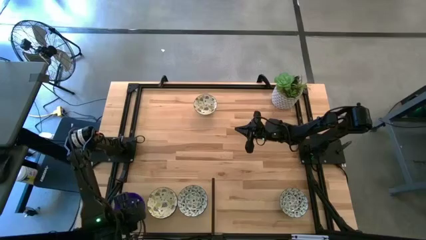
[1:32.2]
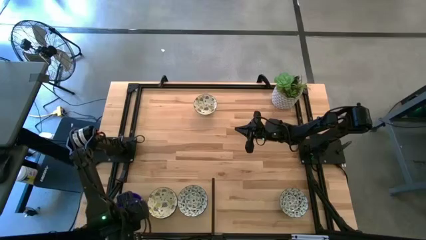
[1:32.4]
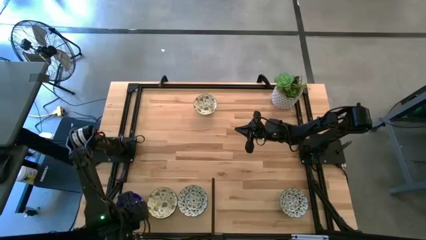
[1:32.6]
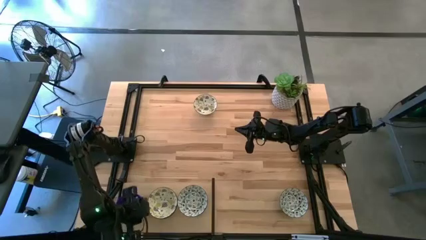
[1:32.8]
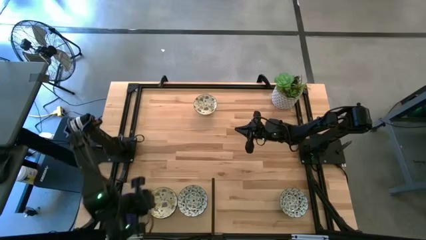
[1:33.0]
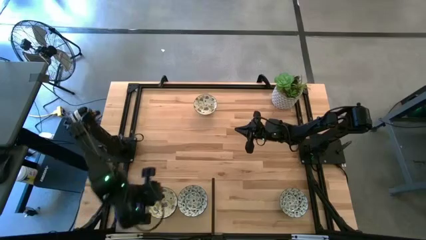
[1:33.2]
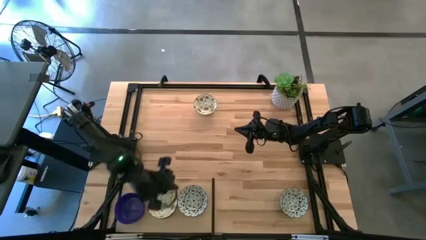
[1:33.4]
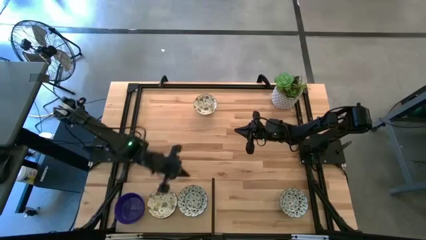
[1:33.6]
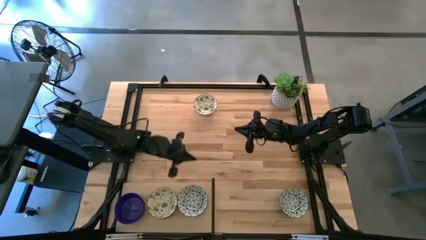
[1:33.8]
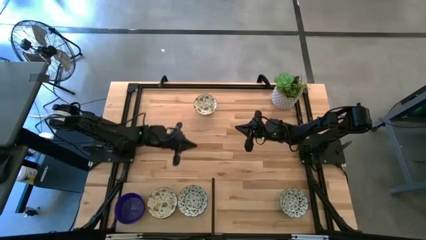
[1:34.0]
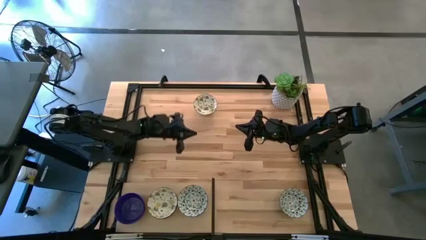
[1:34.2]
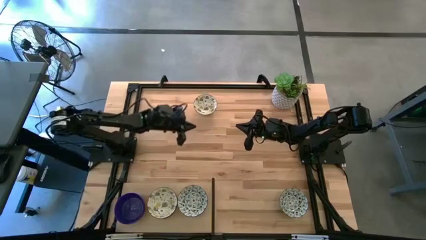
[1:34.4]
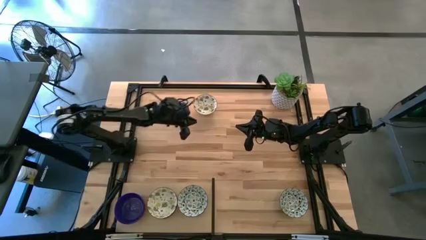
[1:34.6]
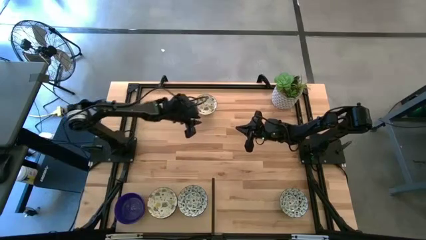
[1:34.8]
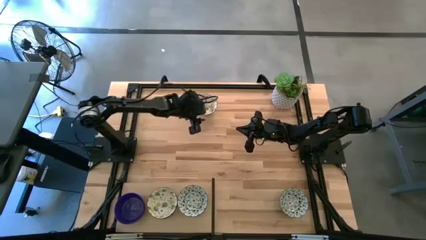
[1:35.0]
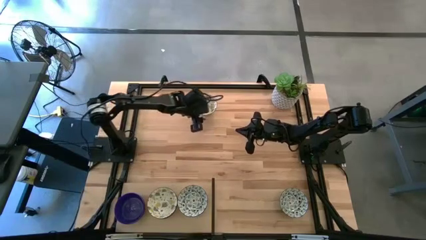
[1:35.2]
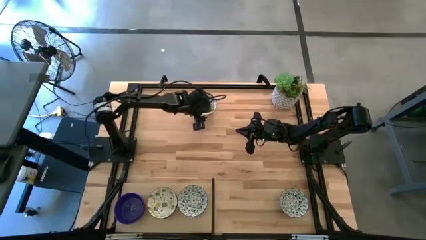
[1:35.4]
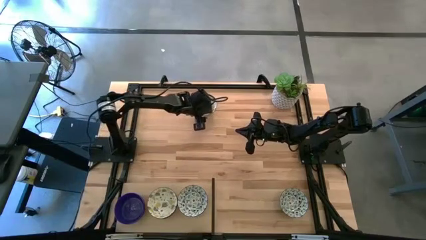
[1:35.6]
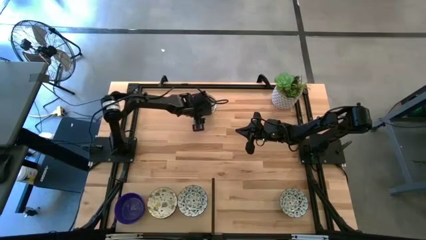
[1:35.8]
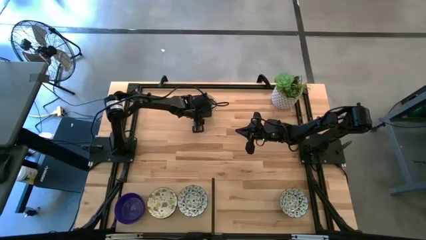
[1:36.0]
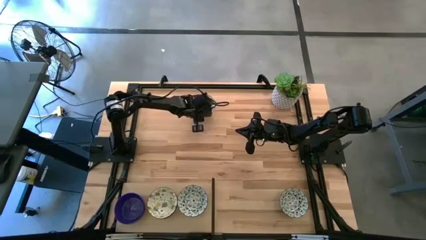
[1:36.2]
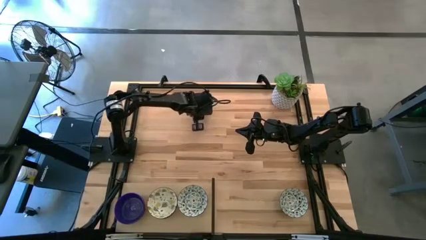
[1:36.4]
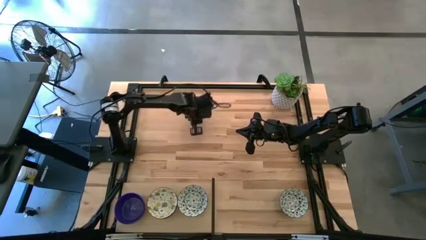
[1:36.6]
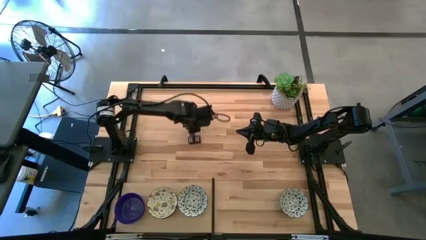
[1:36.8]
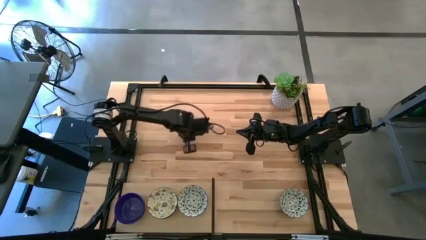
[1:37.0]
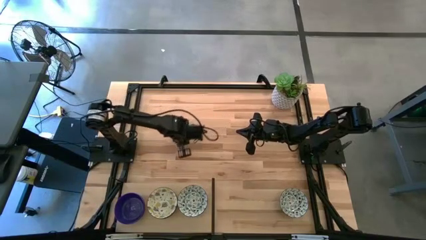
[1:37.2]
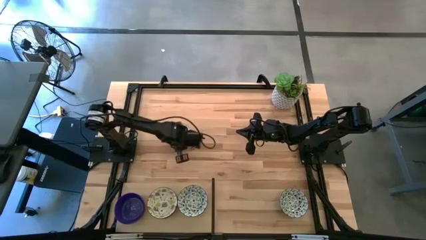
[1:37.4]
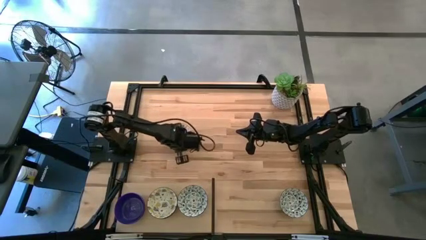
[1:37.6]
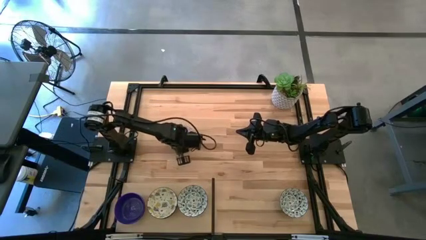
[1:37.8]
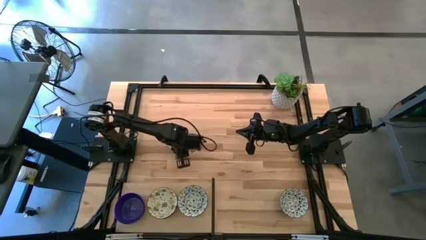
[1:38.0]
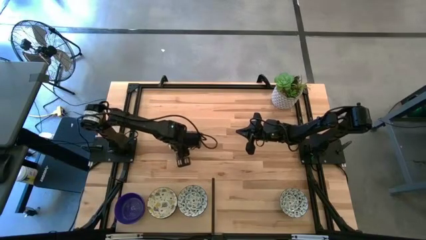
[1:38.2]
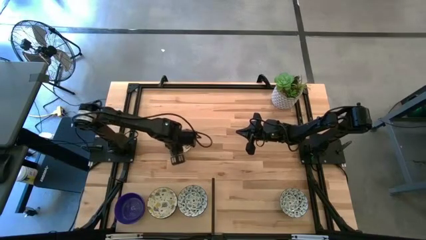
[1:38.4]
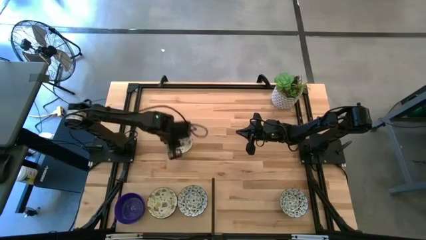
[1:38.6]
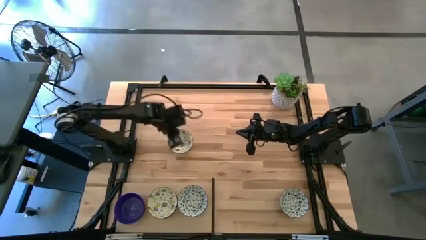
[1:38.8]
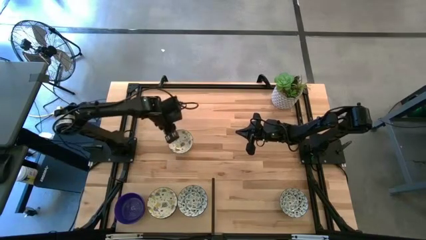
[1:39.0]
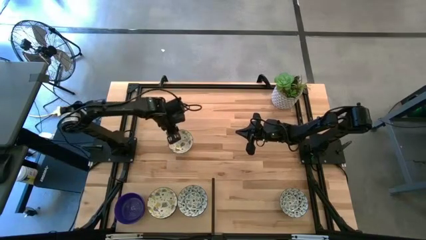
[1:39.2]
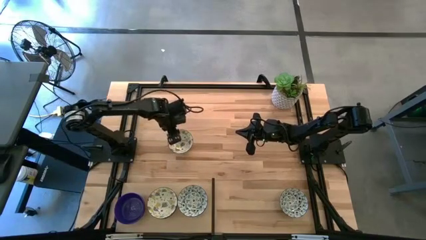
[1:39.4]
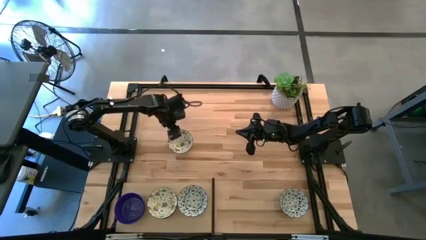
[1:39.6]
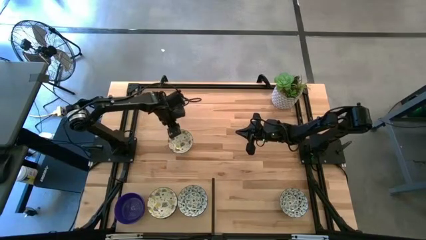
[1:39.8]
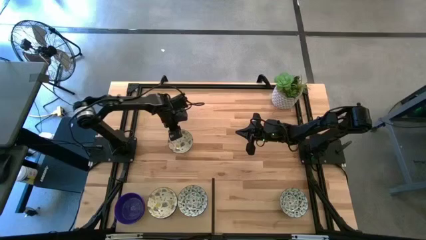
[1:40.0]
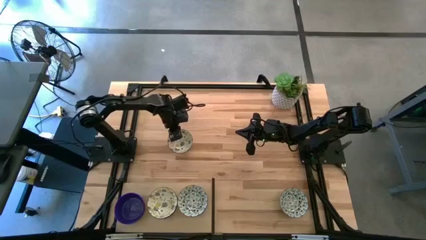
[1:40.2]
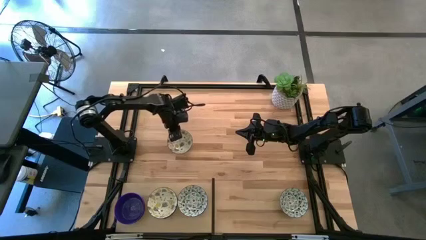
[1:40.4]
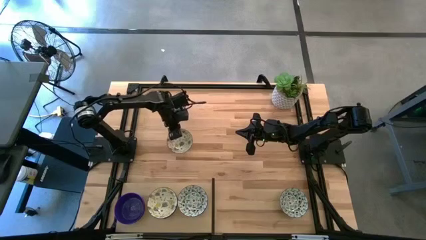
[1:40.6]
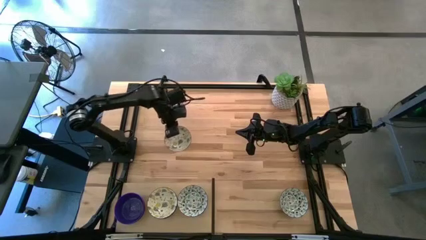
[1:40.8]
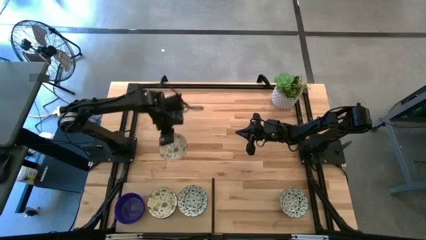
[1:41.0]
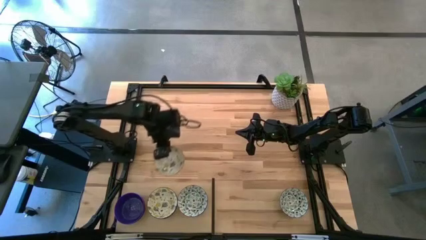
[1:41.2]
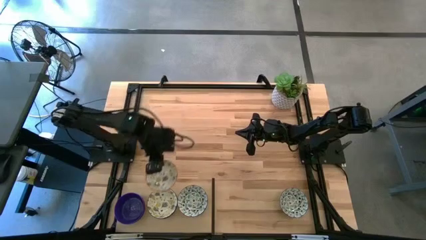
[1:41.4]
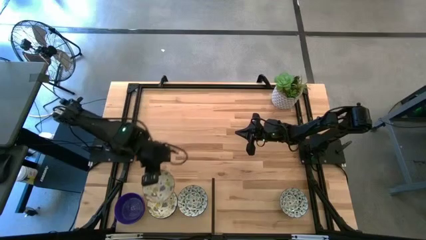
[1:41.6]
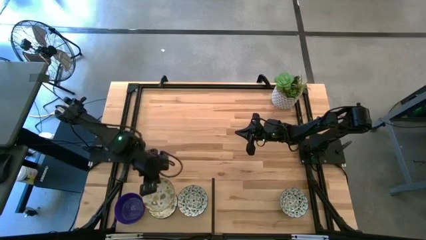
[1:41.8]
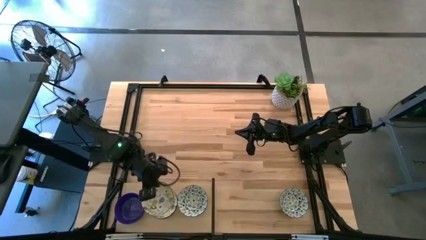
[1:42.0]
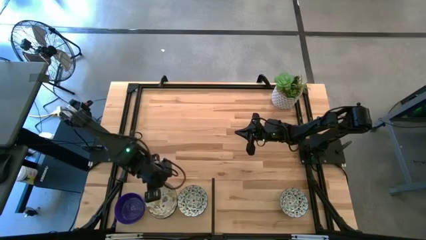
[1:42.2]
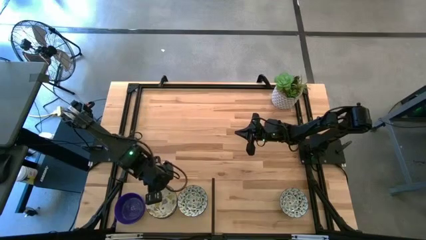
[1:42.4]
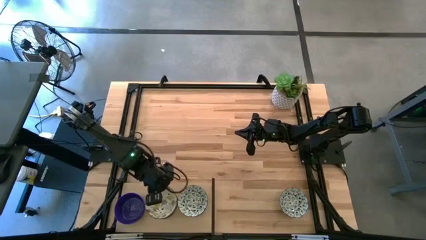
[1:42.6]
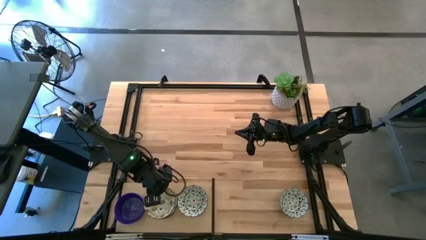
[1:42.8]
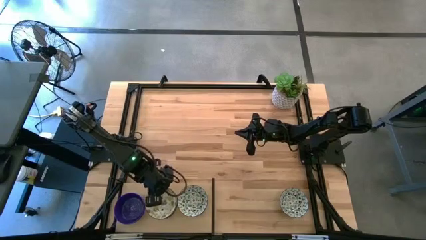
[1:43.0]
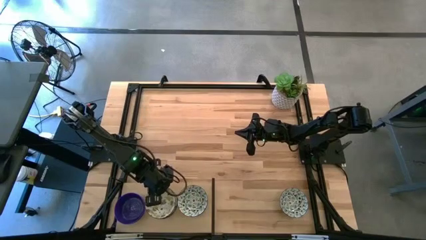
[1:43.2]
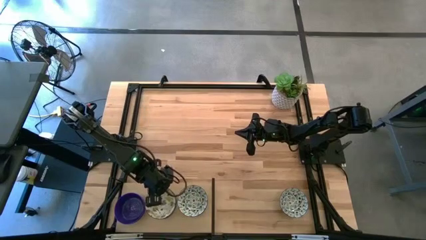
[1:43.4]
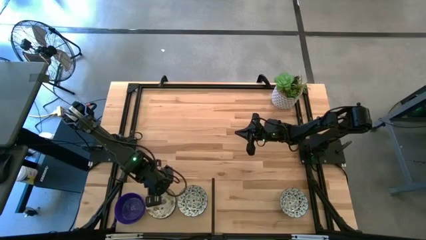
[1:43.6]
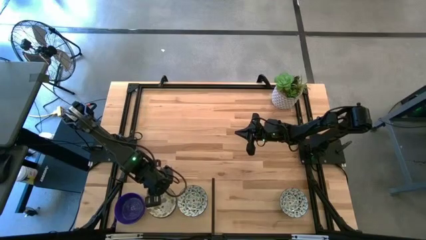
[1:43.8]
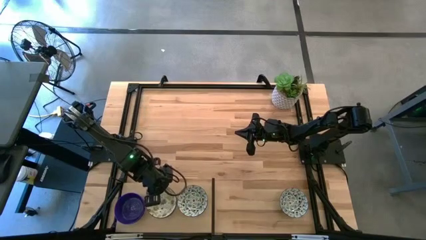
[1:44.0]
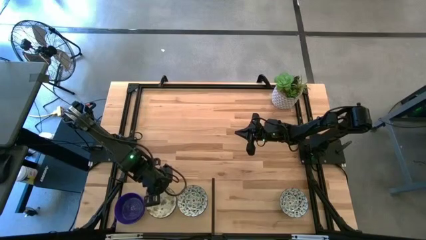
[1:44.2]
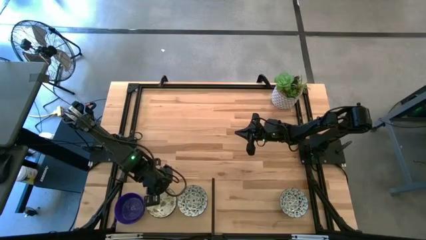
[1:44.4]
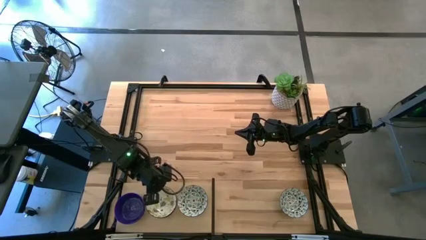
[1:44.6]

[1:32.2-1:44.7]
Task: Pick & Place Mini bowls
Stack the yellow patterned bowl on top of the other stacked yellow patterned bowls on the shelf

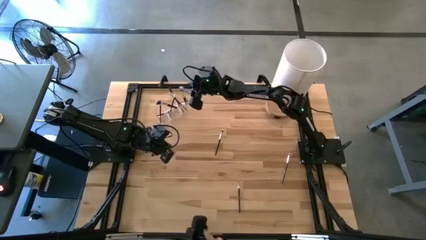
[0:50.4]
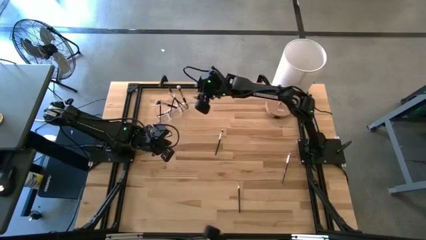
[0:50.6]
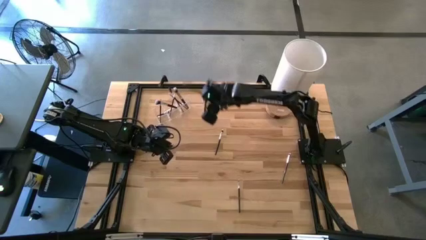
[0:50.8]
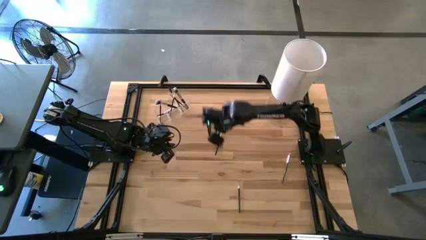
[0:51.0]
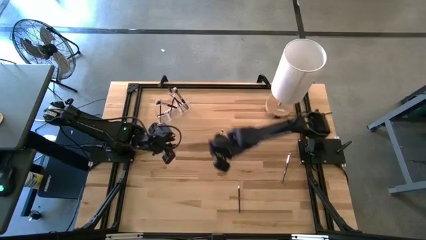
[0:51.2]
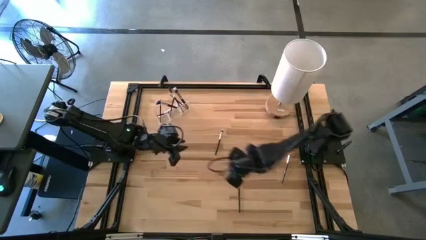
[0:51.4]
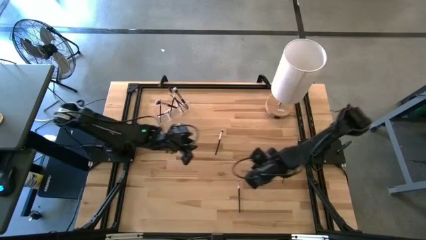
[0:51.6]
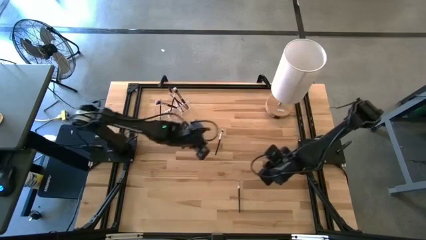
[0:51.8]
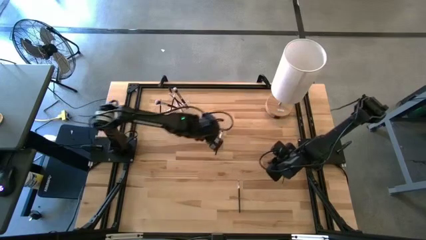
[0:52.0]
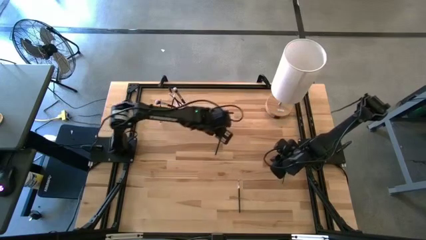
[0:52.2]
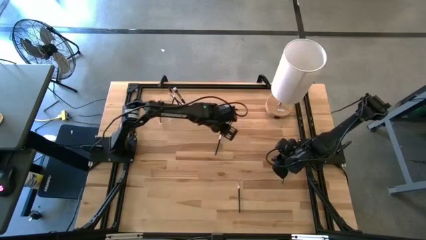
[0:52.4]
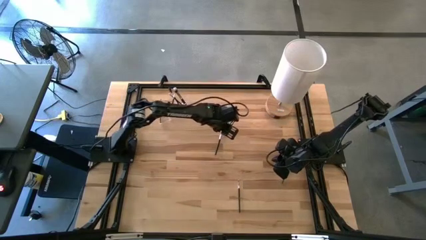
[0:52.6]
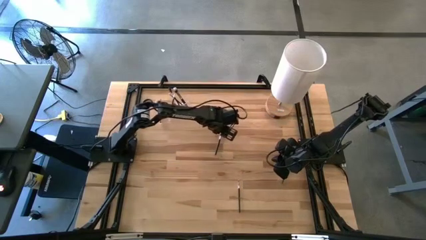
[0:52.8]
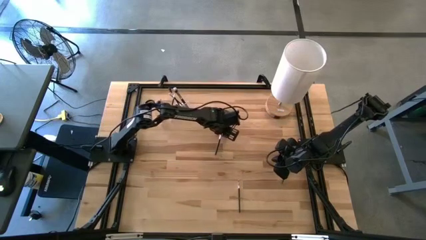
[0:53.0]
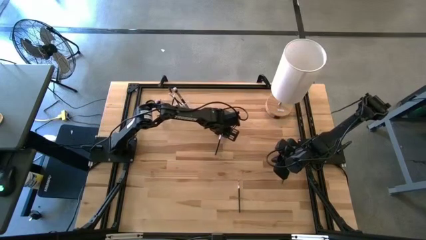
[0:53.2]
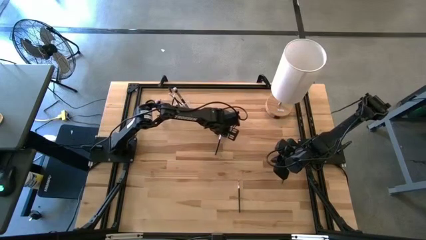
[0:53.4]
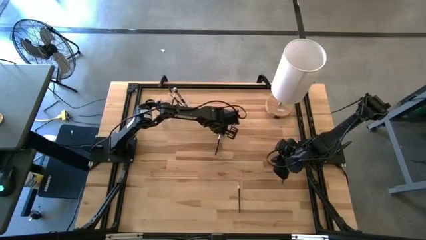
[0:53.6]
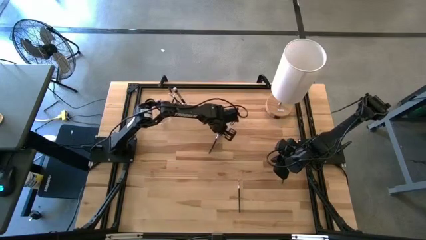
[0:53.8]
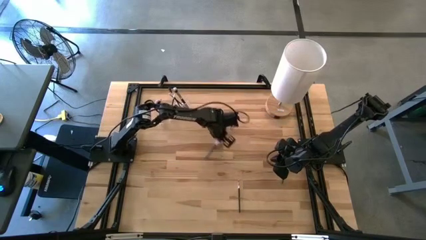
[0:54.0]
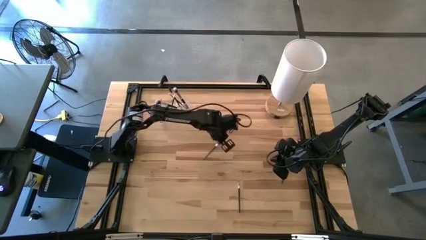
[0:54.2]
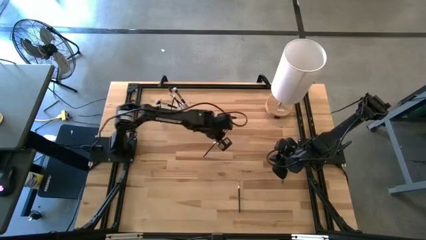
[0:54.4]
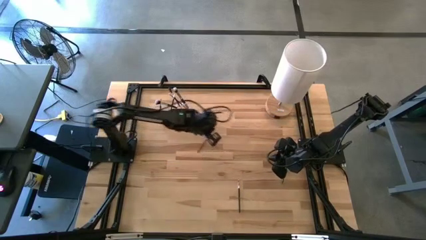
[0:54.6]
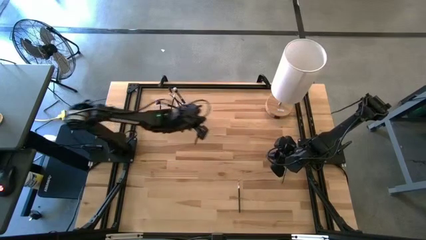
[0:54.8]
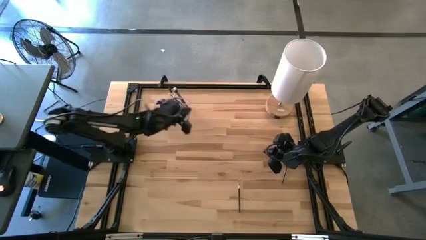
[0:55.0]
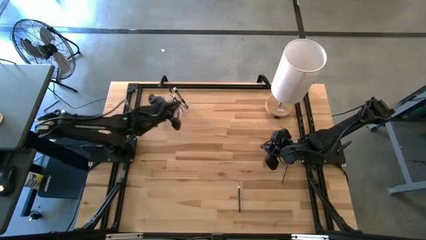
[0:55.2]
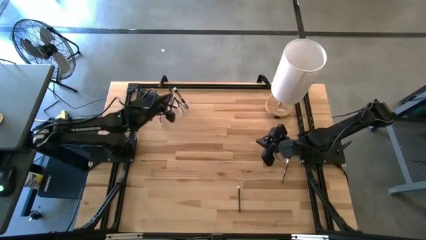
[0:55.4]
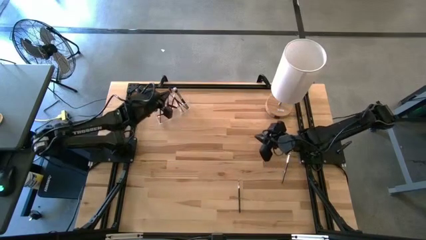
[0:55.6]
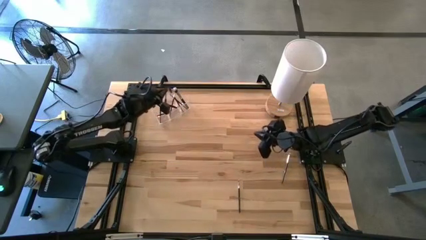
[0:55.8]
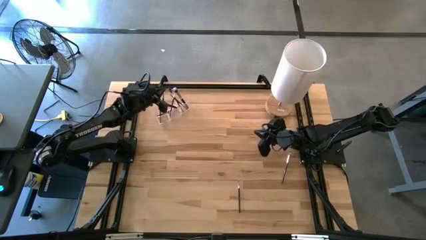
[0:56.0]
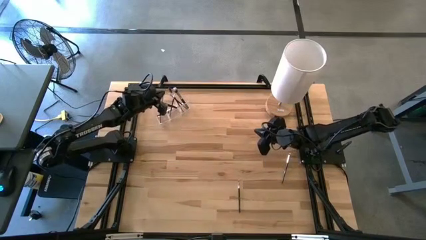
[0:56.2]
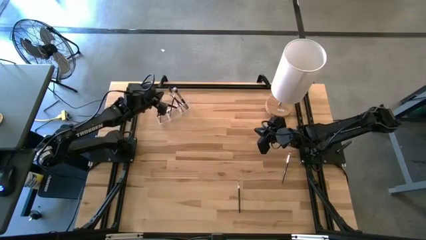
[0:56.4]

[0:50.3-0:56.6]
Task: Put items in baskets/containers
Put the eyeshadow brush into the transparent organizer
